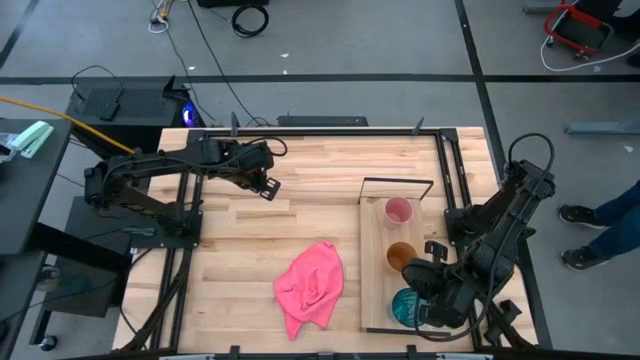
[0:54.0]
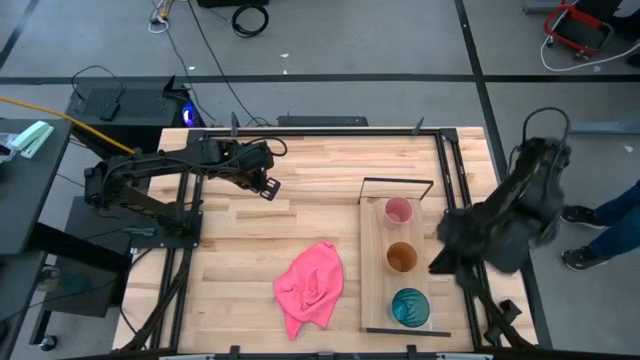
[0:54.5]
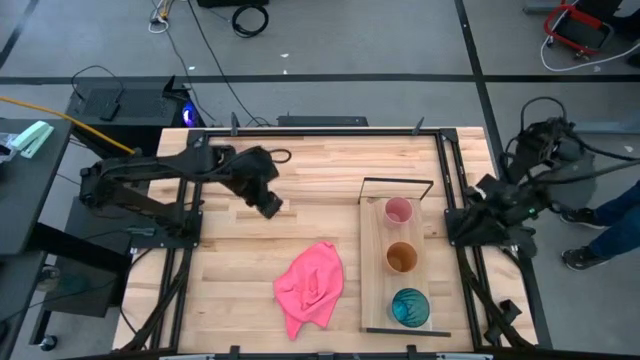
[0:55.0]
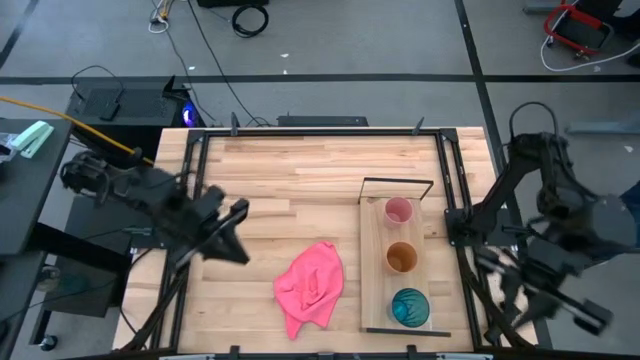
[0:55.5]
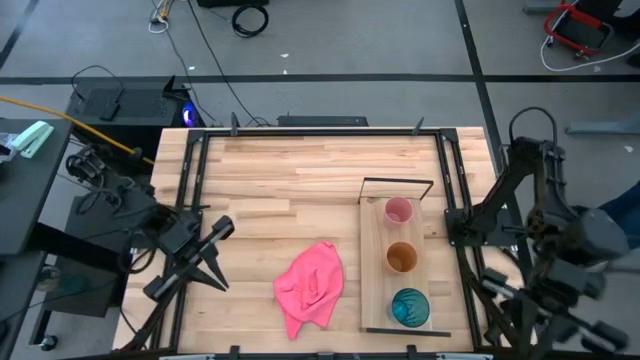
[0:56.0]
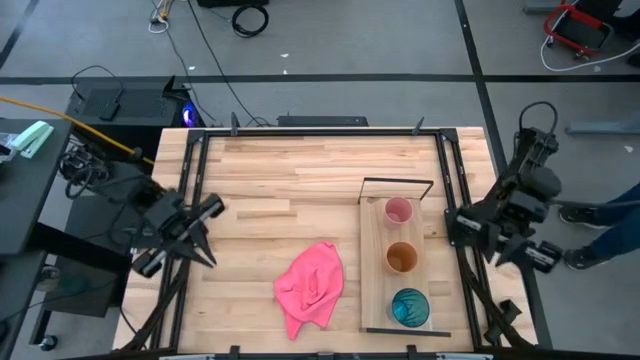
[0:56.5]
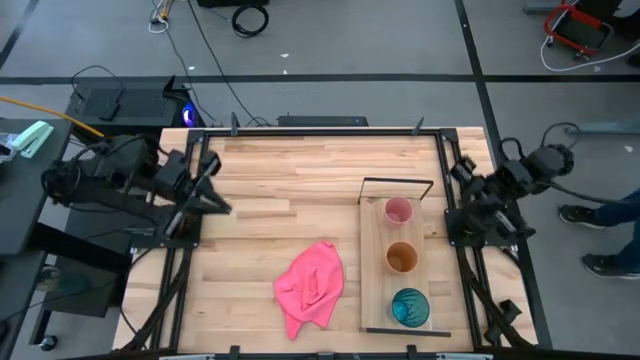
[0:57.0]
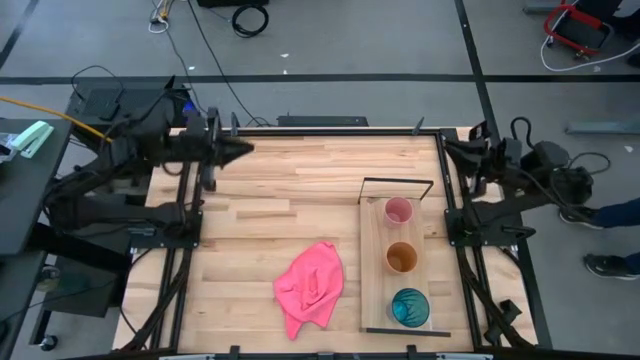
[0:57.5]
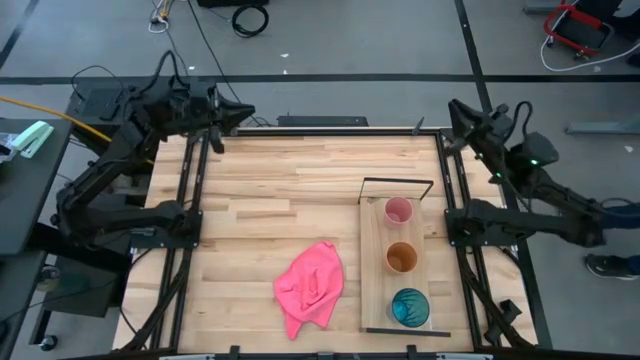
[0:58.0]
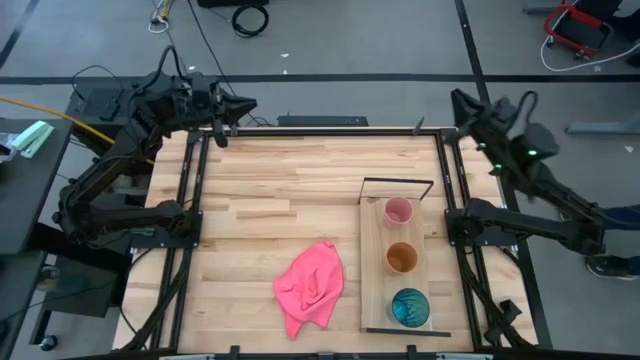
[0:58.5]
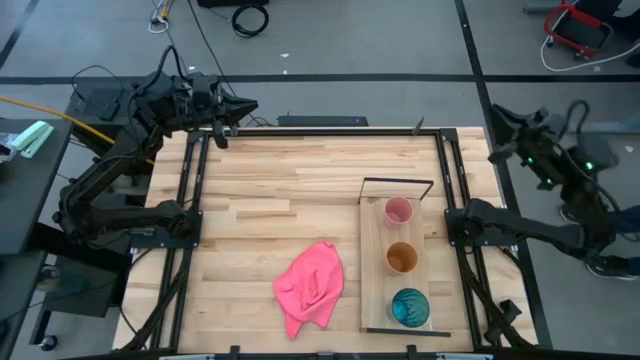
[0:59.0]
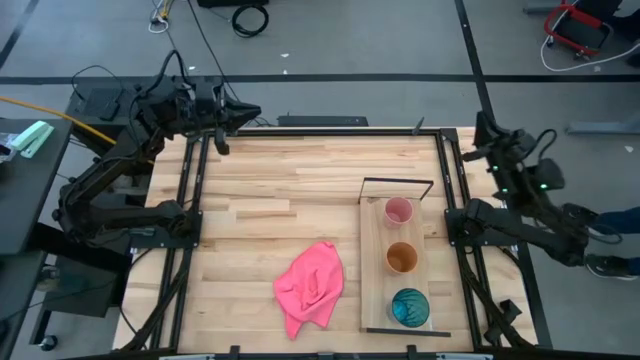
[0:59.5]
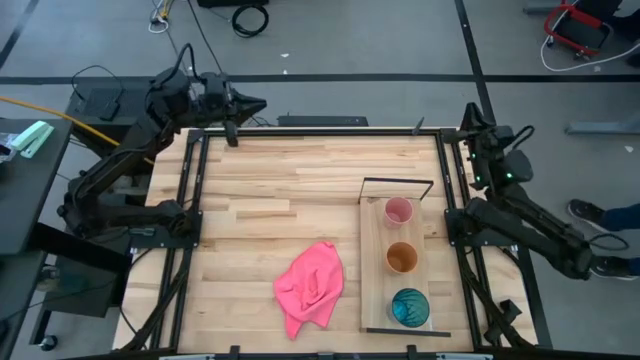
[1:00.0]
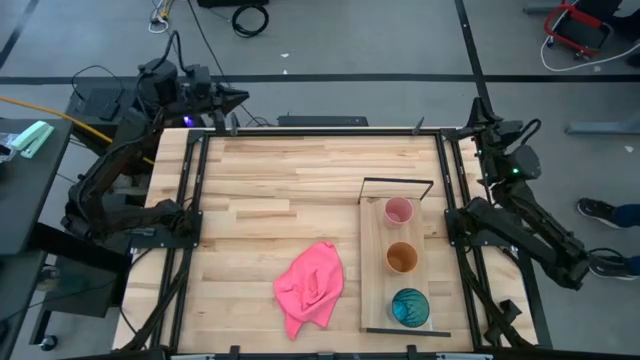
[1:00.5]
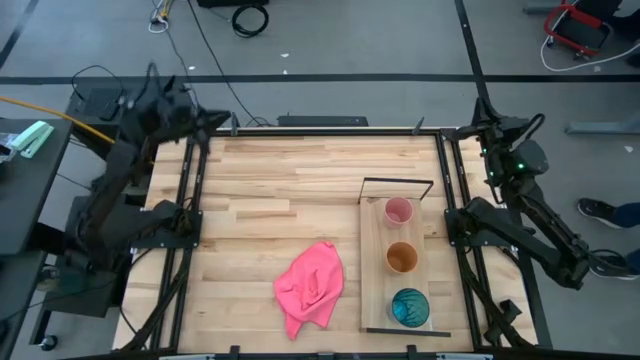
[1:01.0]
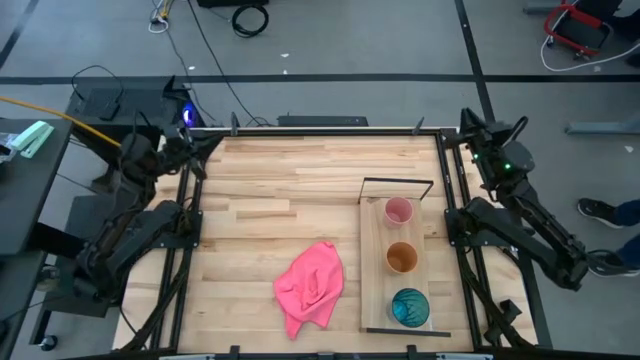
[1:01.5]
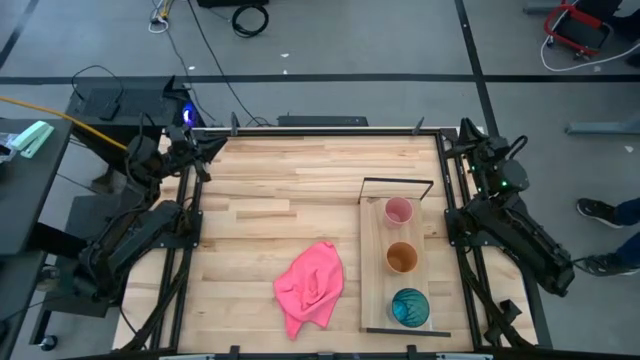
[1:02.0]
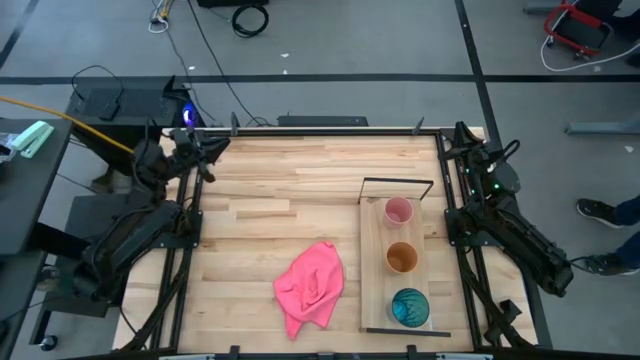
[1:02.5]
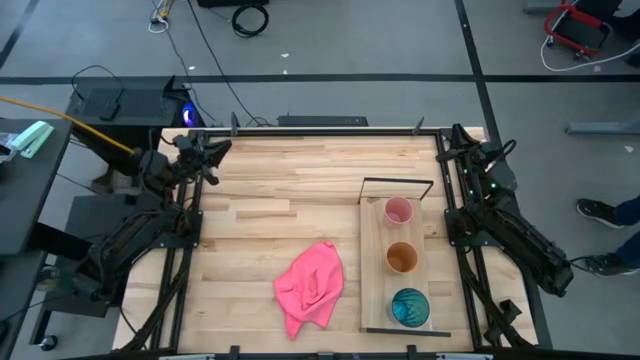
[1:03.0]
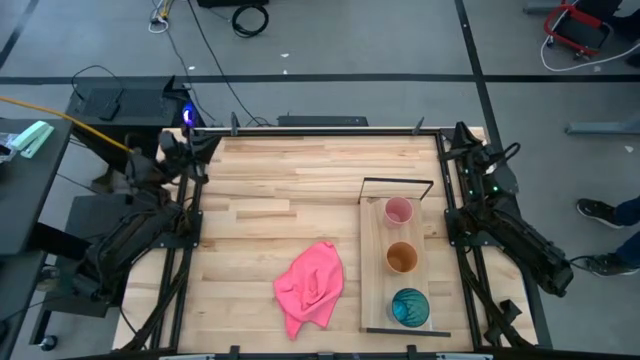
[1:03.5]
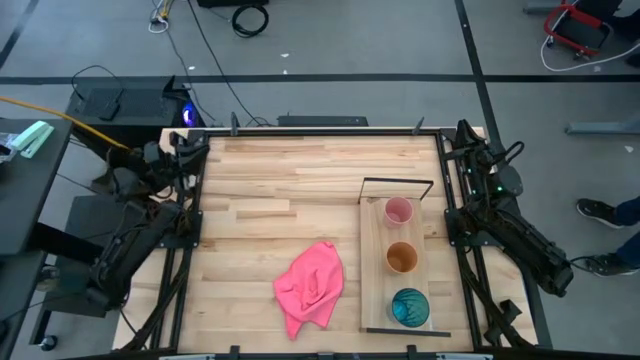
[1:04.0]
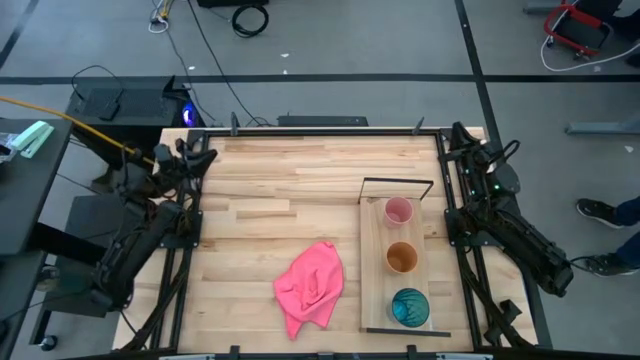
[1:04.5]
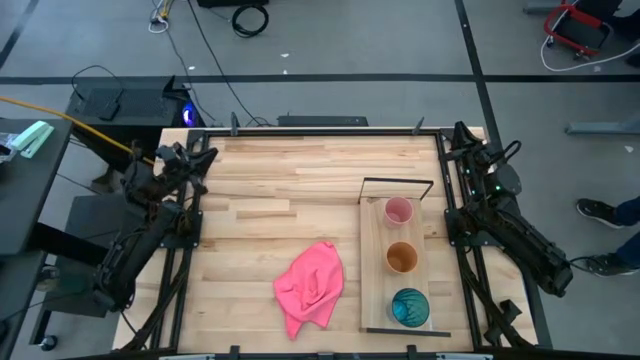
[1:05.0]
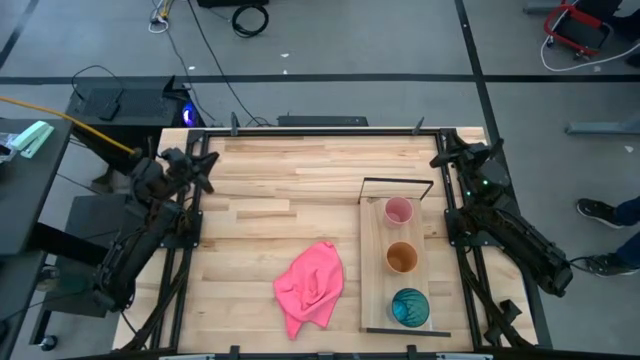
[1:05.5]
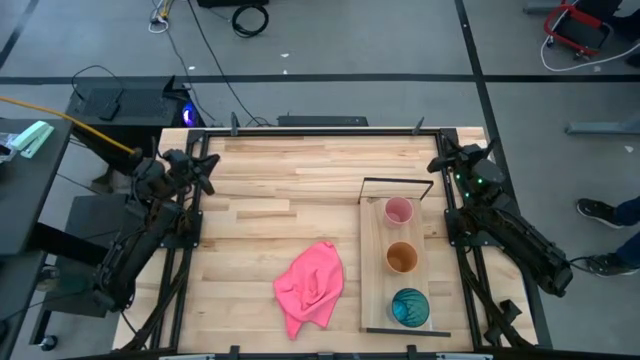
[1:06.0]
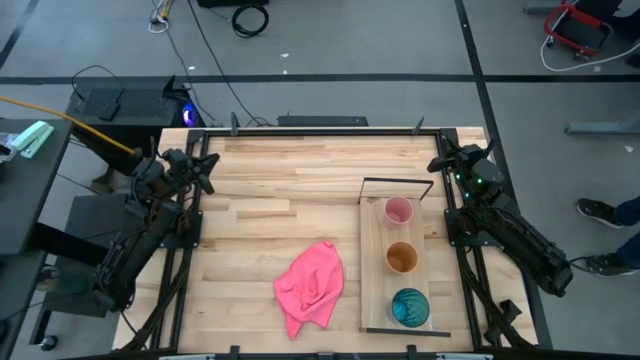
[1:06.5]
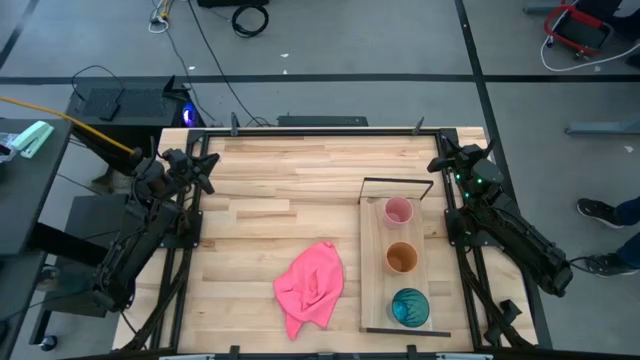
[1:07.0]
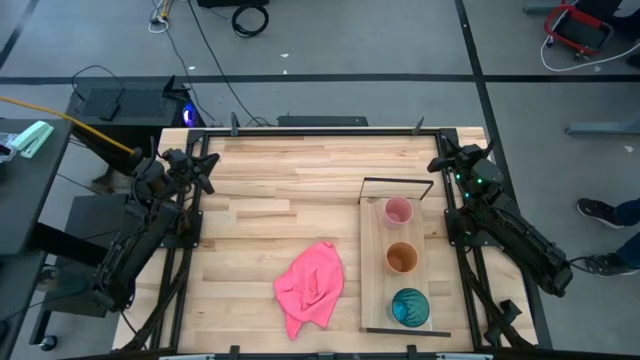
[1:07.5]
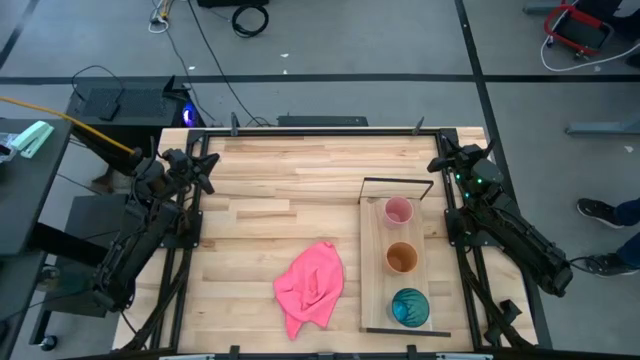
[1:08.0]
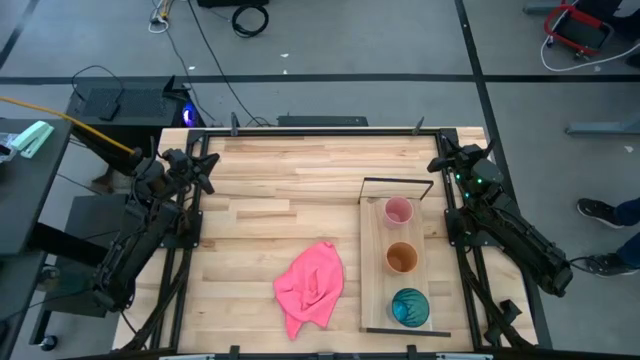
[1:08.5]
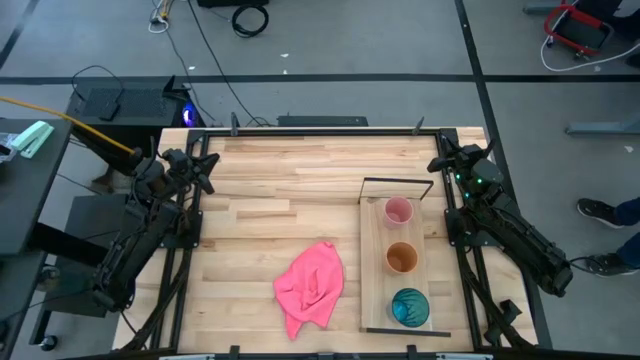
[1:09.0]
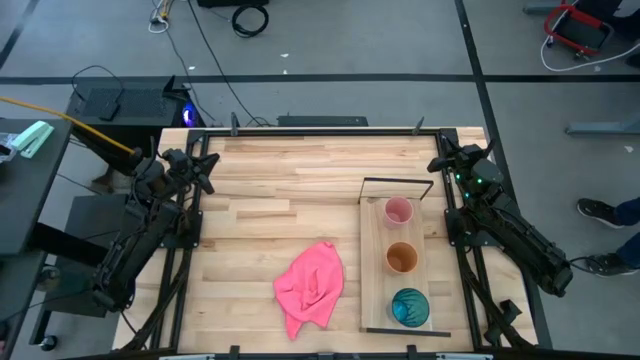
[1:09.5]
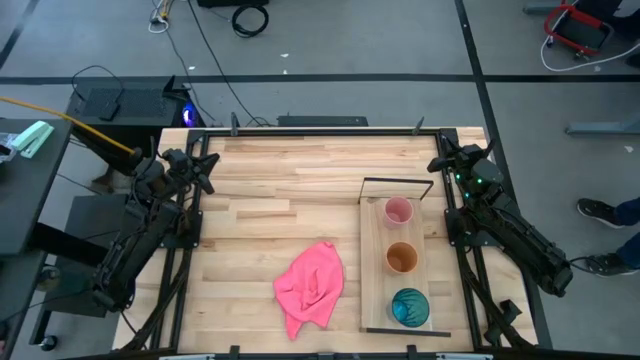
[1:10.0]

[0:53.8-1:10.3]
Task: Stack small to large cups/mugs on shelf
Return to Home Position
